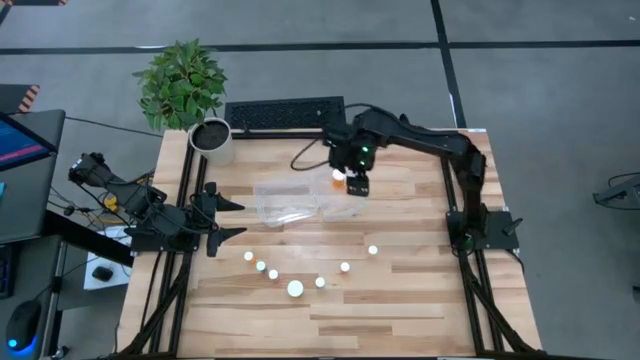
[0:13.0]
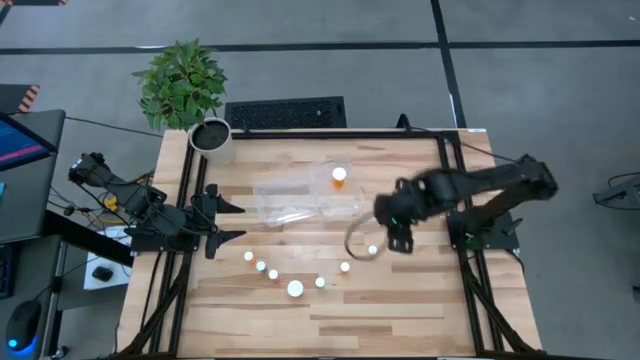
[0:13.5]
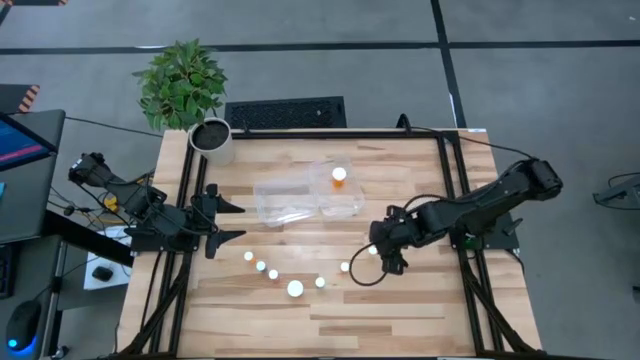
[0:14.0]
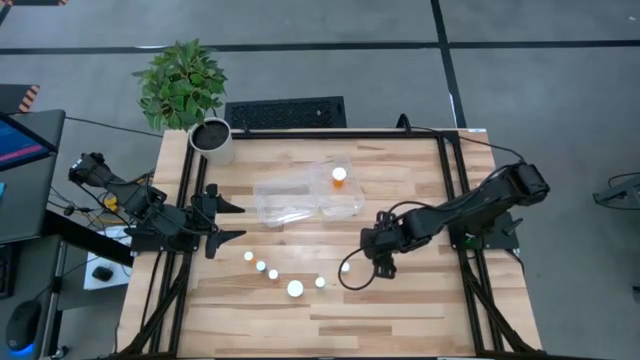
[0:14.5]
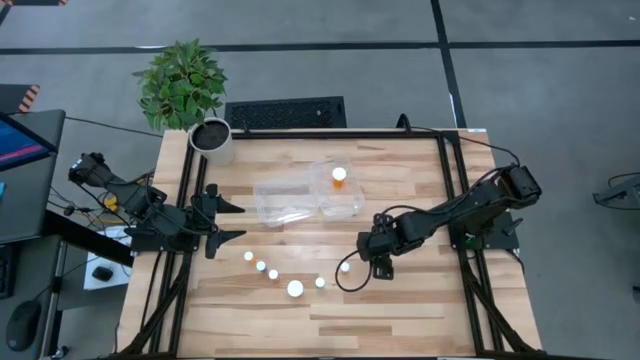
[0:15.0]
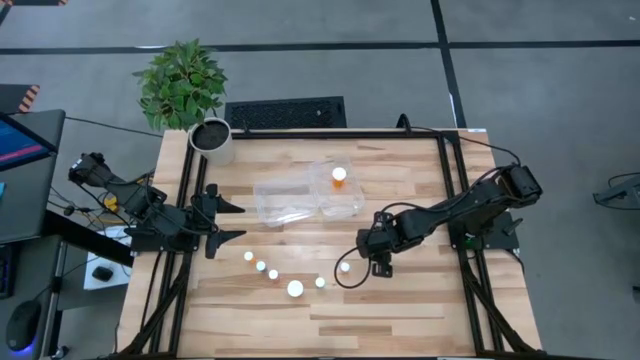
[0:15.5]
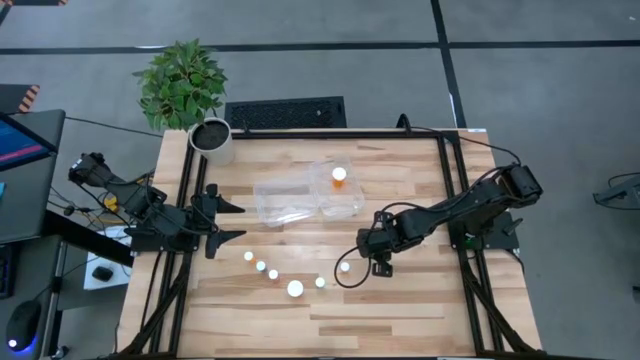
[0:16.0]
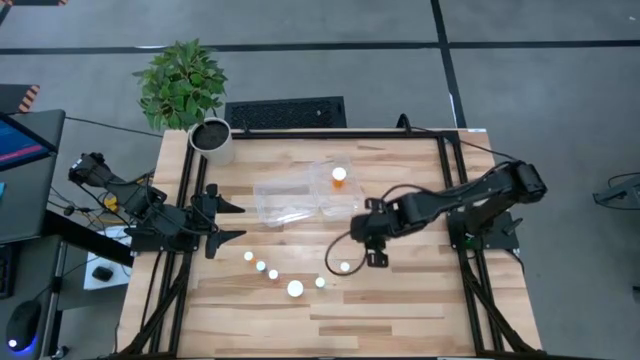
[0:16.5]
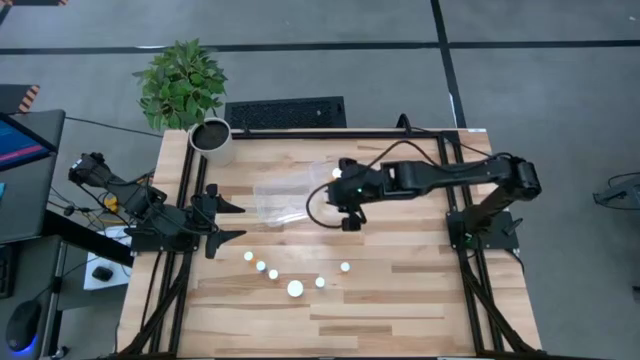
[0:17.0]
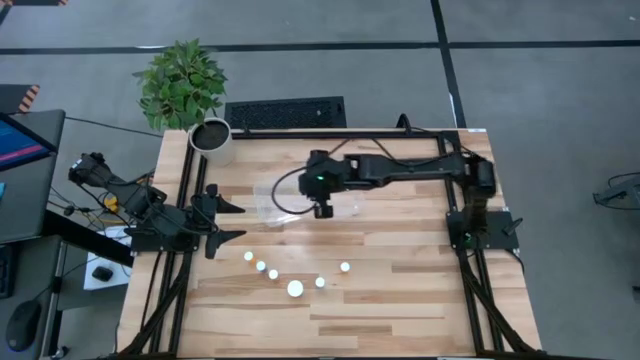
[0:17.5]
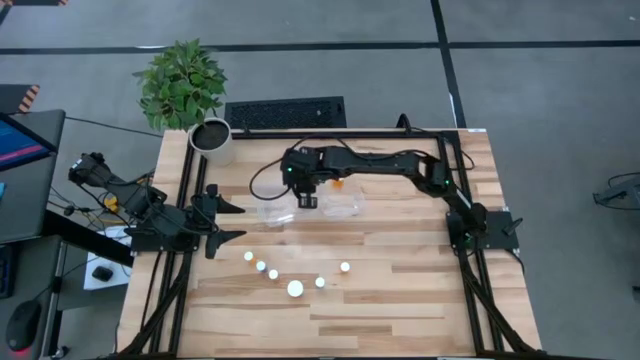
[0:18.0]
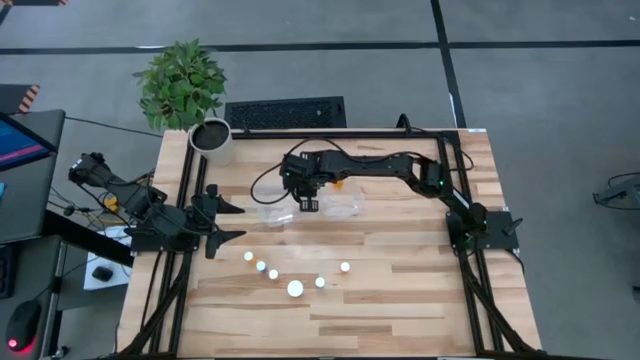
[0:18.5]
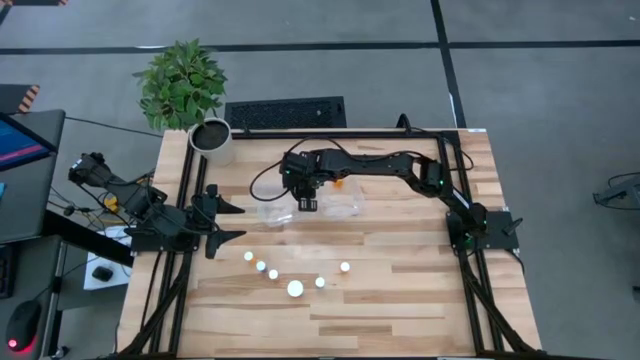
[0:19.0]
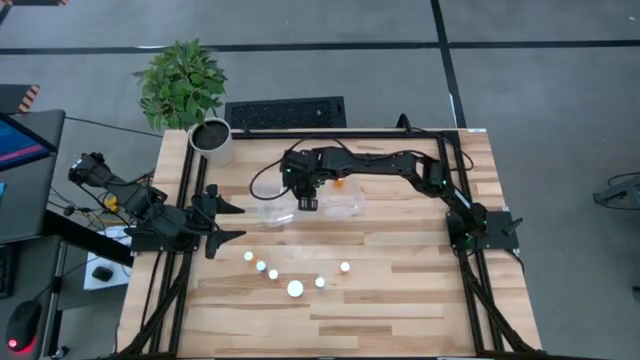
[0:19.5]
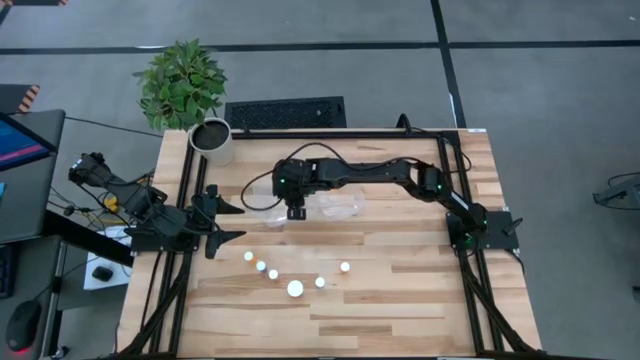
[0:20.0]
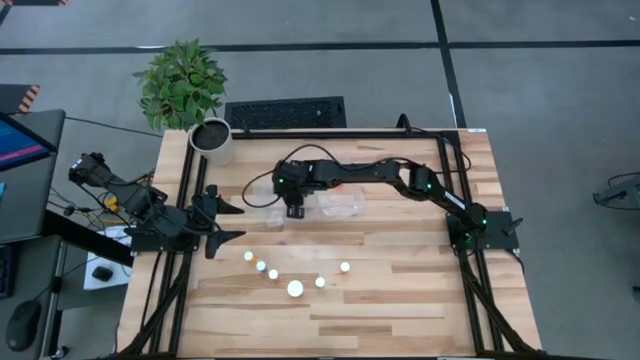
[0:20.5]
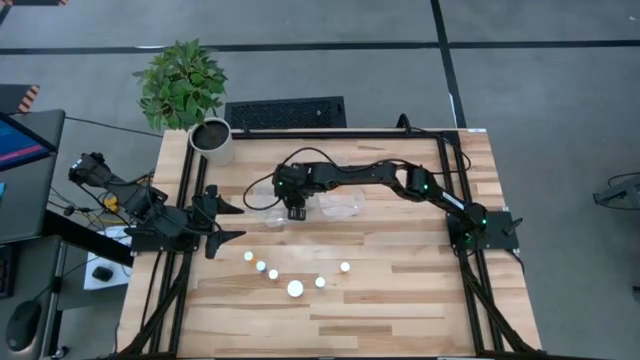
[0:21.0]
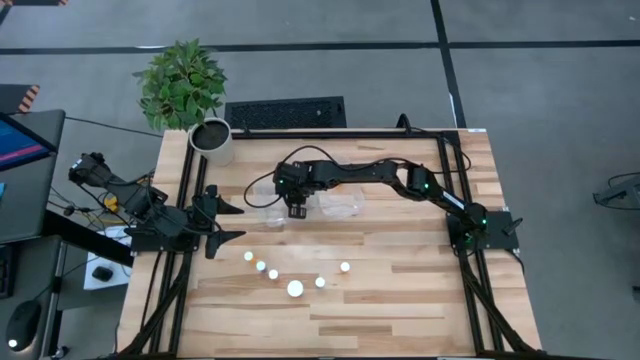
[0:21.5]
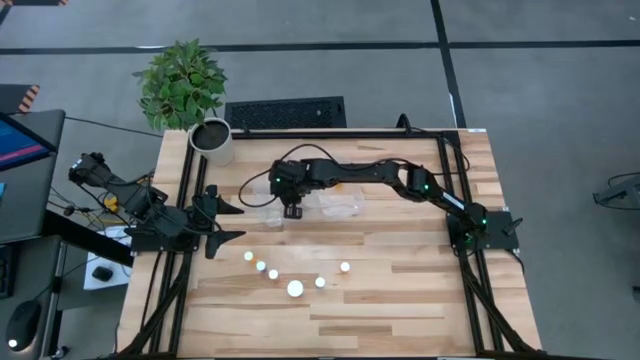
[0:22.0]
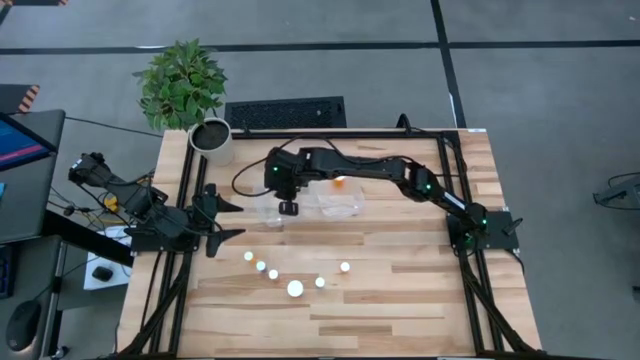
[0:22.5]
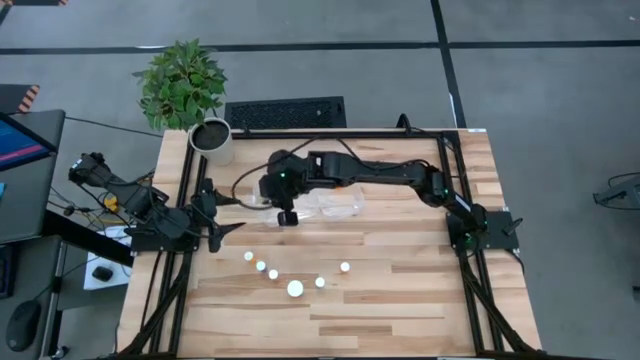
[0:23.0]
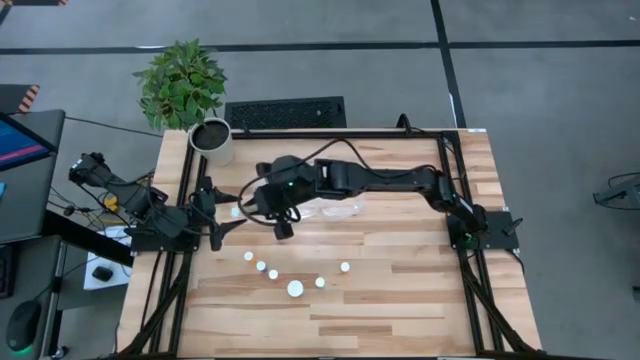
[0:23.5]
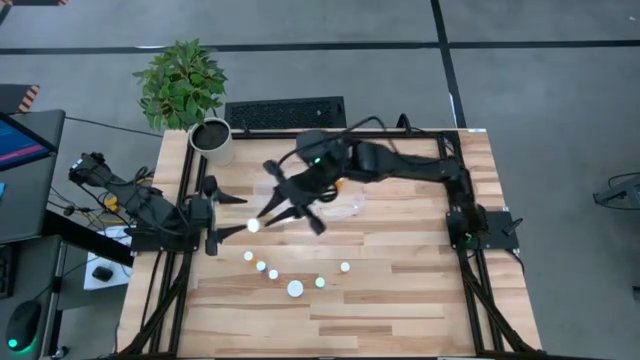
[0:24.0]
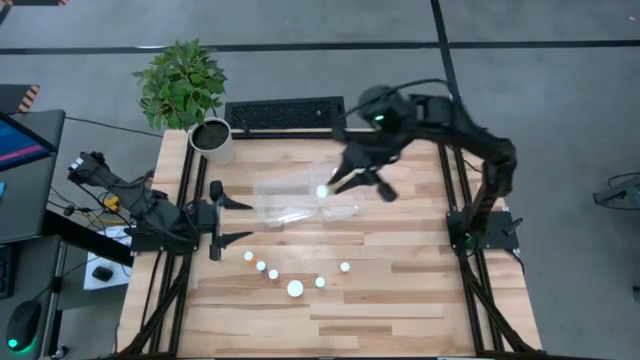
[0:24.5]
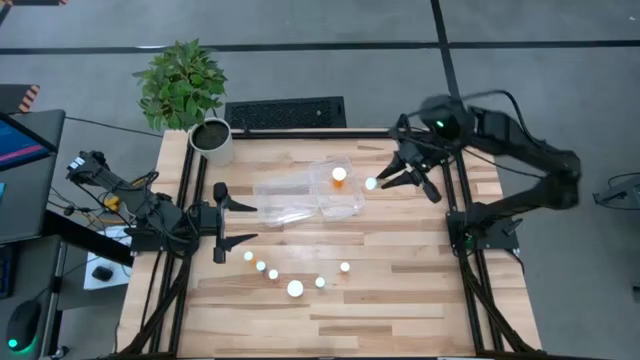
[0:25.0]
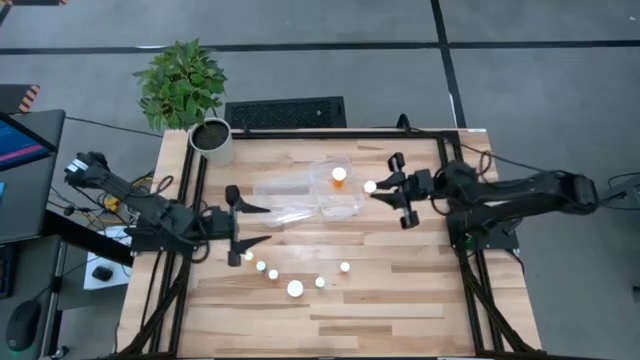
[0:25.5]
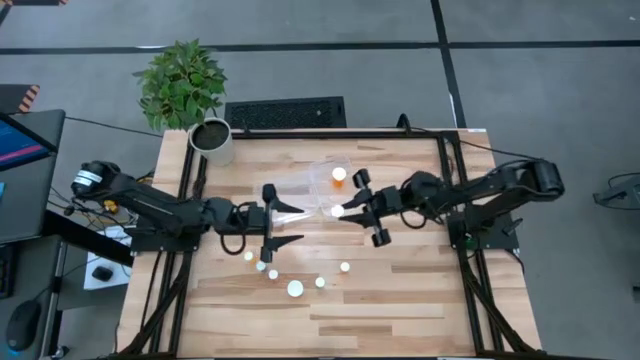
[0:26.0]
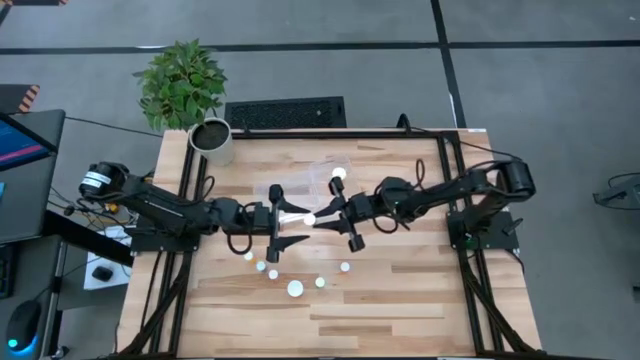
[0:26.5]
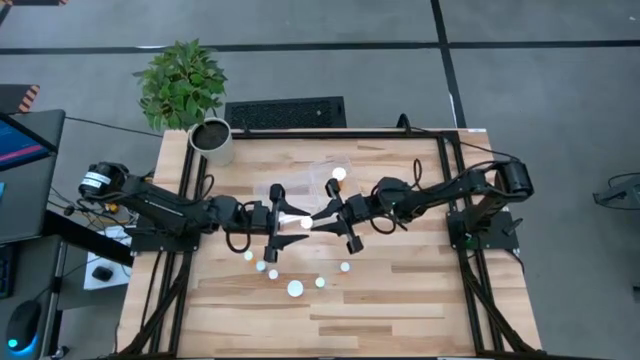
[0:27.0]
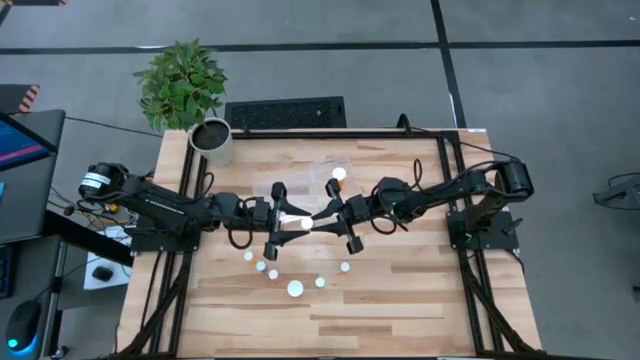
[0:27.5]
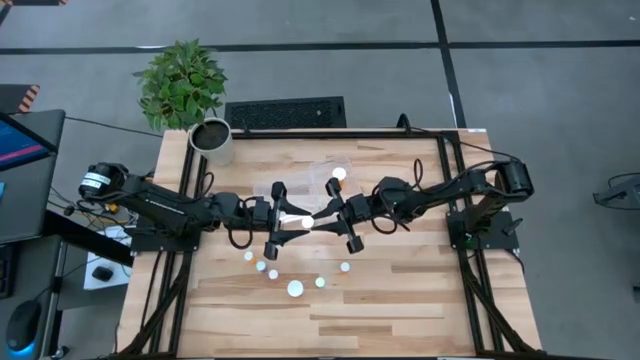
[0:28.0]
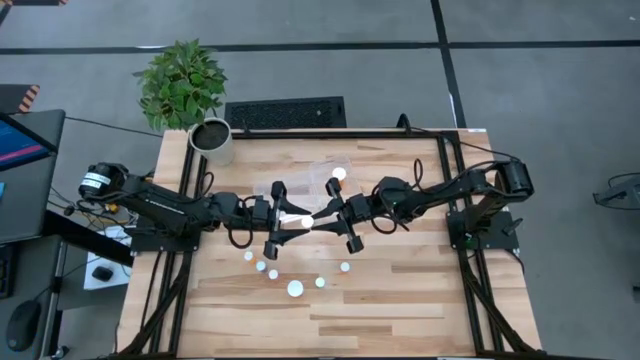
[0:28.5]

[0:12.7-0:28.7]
Task: Pick and place medicine bottles into bin by pill shape (circle, oval)
Put the yellow tablet bottle into the left transparent bin

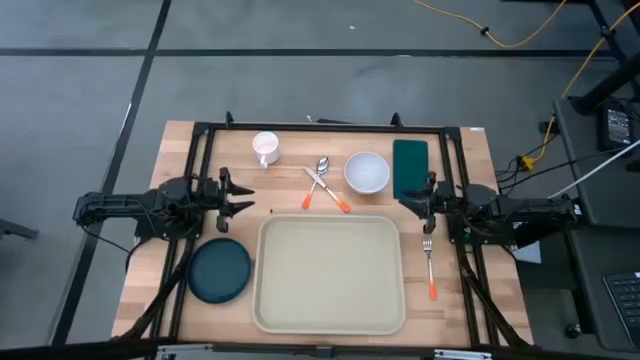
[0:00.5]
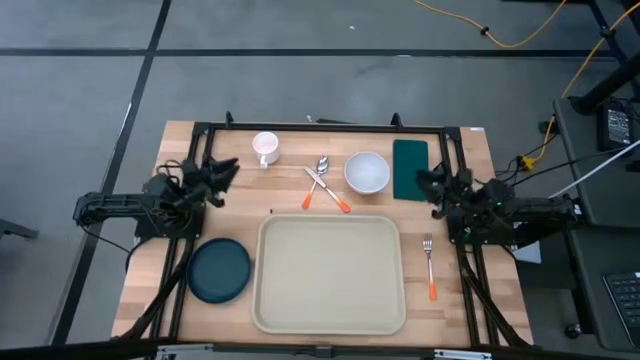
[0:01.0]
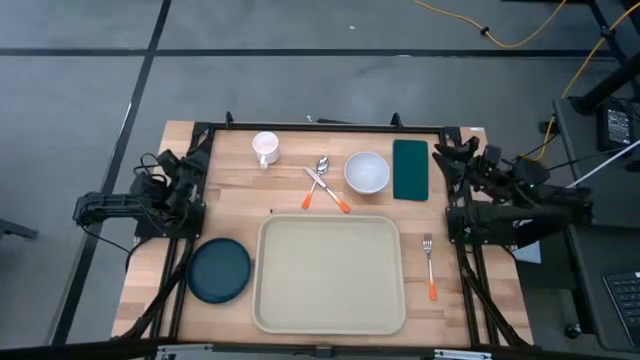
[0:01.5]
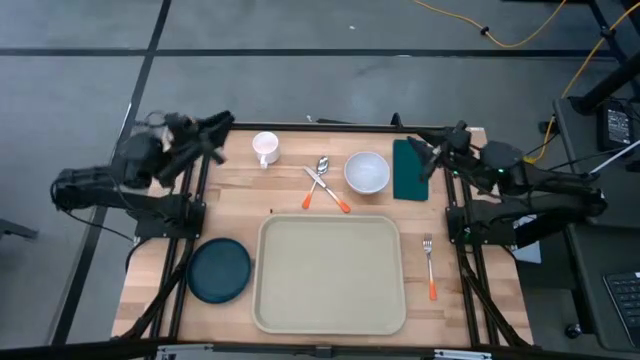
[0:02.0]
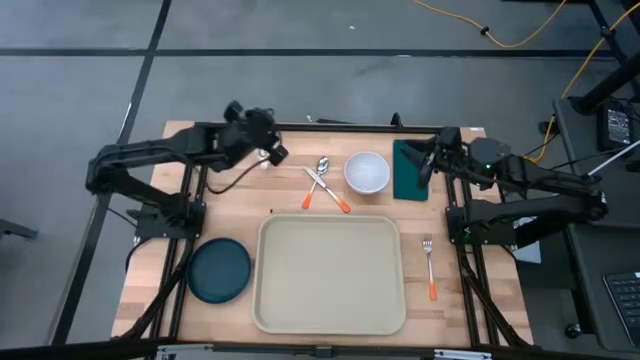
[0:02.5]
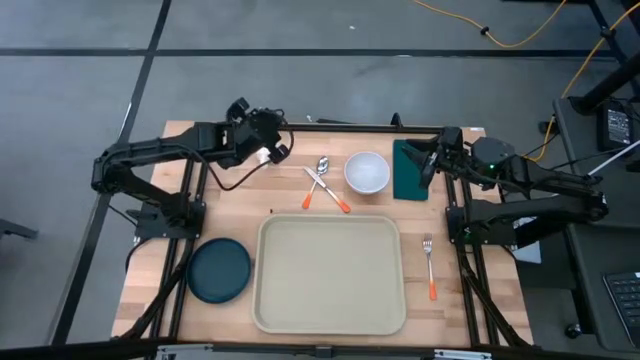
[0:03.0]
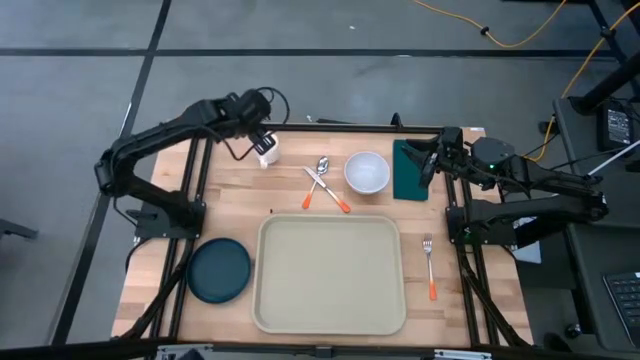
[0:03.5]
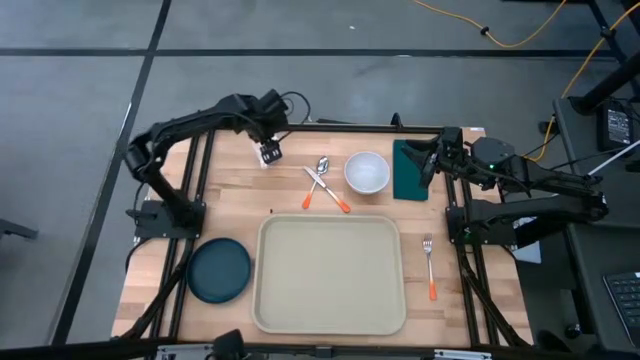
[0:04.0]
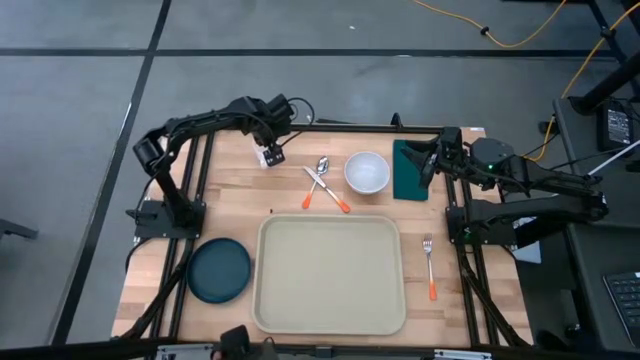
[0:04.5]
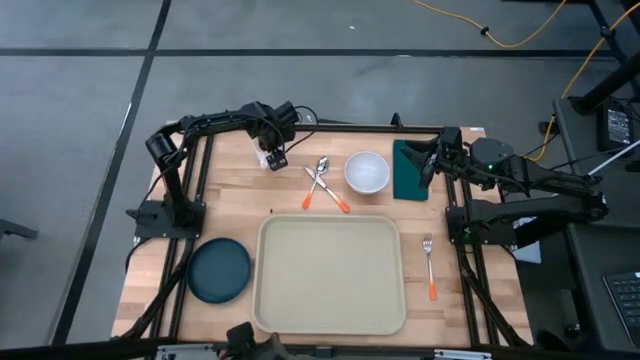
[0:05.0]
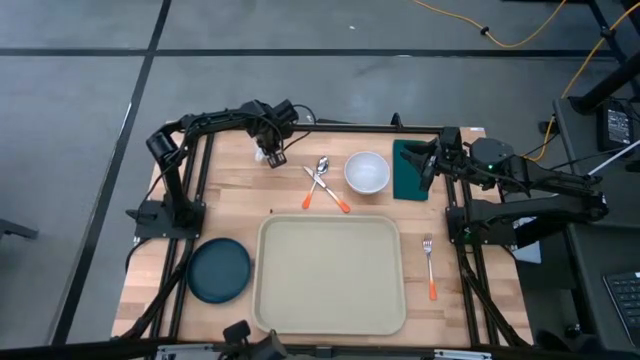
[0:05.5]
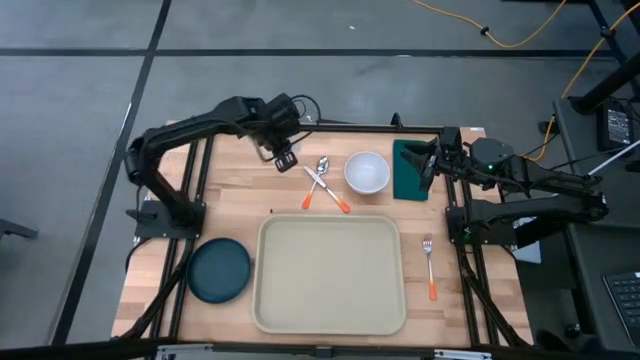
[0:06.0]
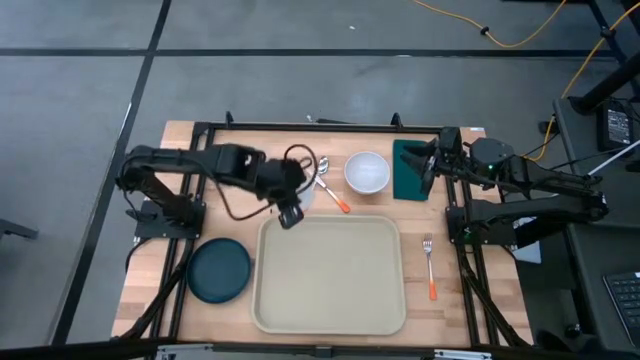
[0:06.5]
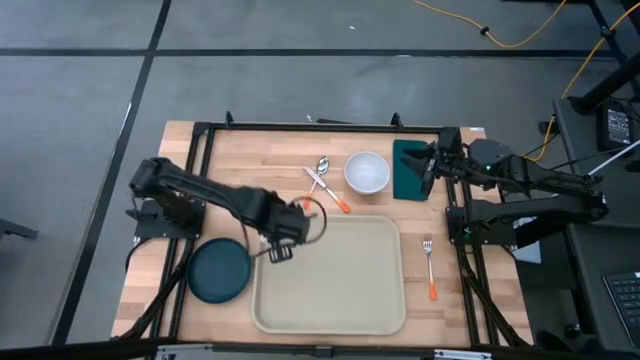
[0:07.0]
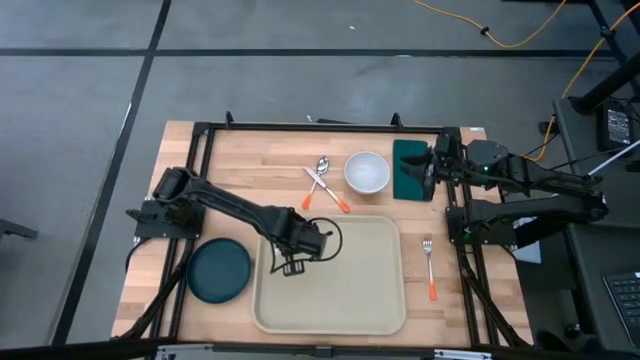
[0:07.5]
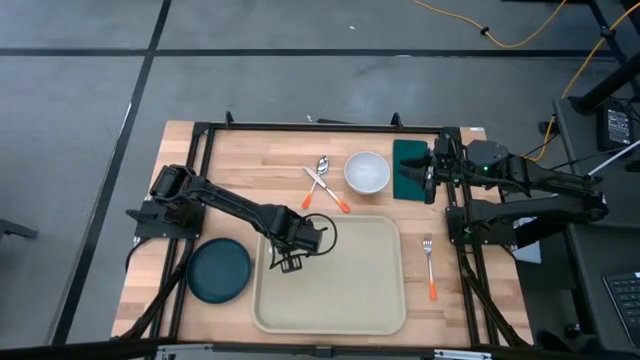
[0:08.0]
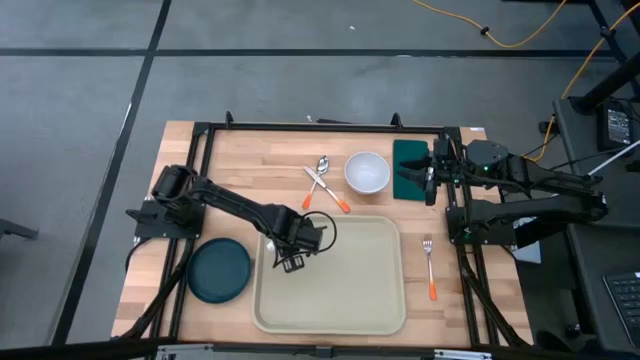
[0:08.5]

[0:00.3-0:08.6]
Task: Set up tray
Put the white cup on the top left of the light brown serving tray
